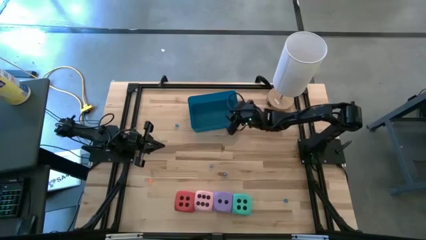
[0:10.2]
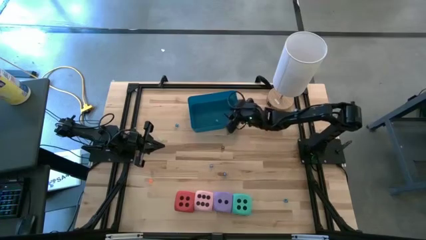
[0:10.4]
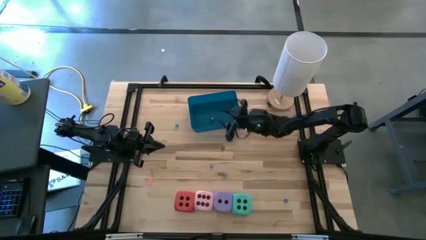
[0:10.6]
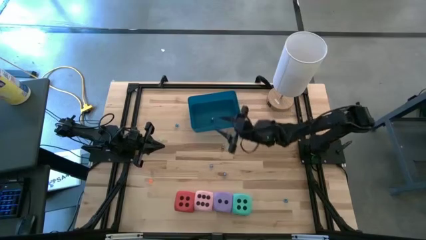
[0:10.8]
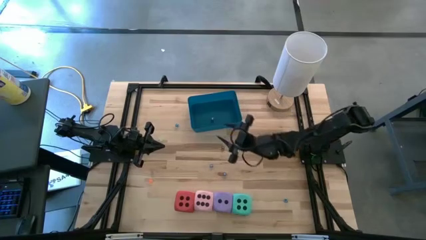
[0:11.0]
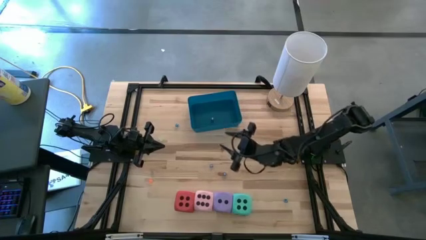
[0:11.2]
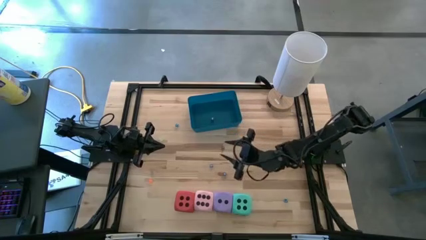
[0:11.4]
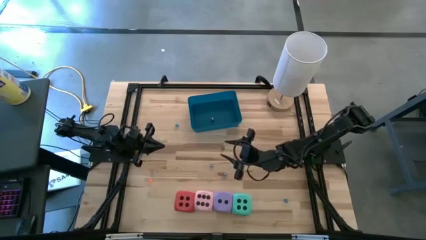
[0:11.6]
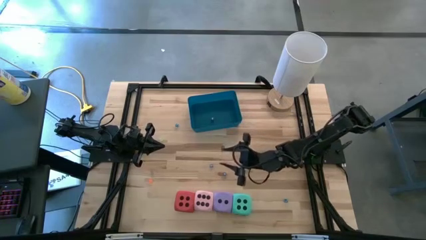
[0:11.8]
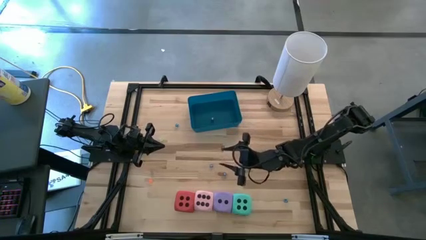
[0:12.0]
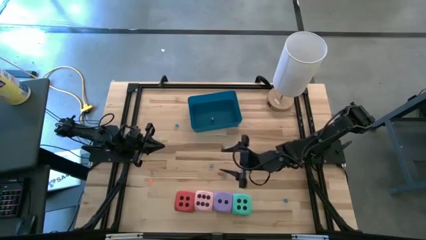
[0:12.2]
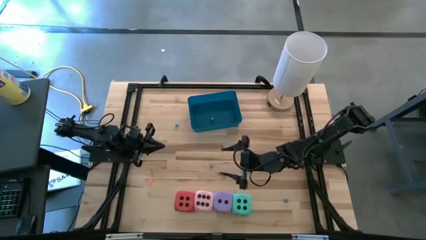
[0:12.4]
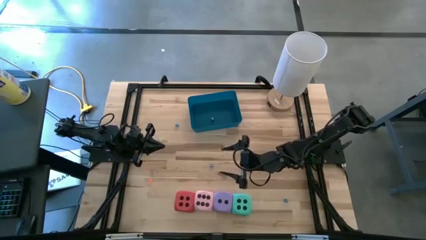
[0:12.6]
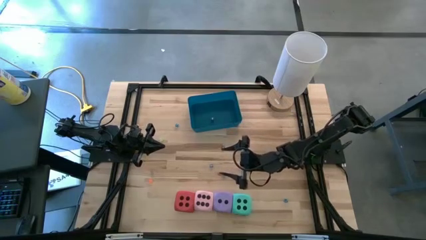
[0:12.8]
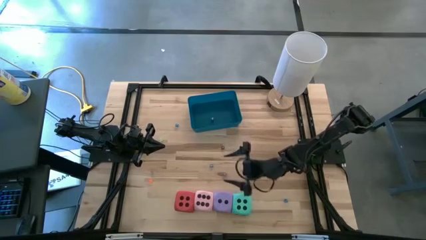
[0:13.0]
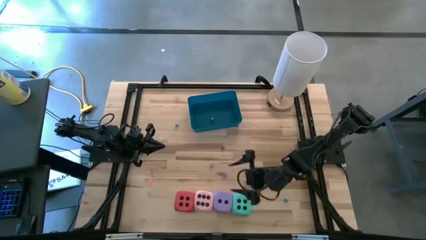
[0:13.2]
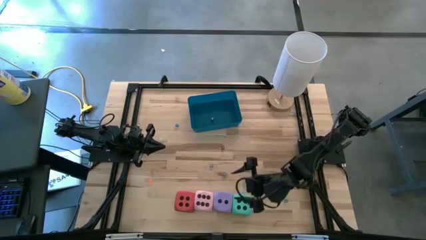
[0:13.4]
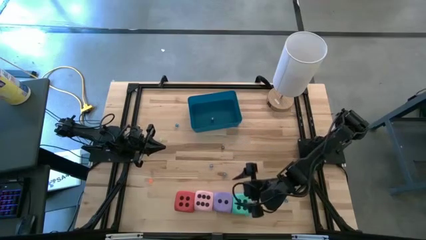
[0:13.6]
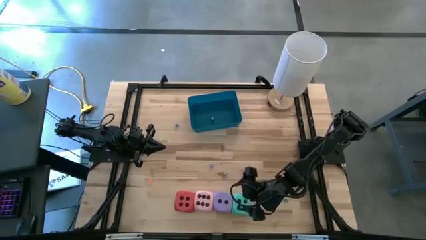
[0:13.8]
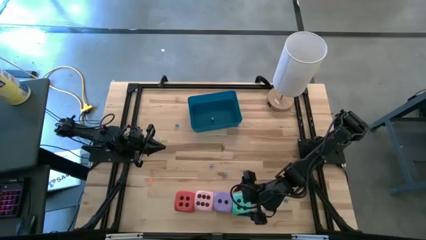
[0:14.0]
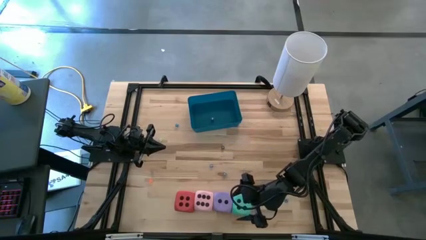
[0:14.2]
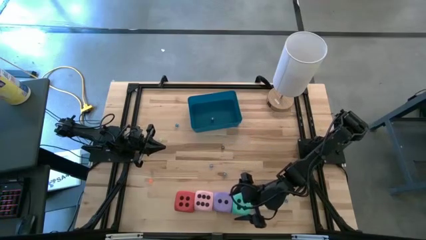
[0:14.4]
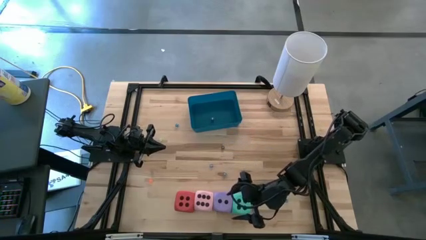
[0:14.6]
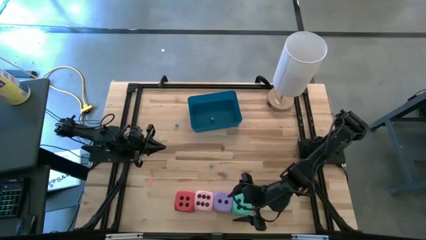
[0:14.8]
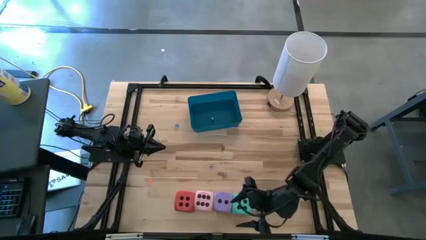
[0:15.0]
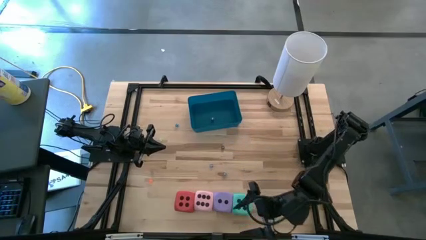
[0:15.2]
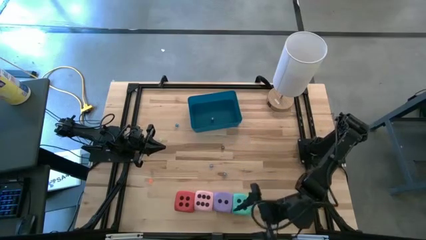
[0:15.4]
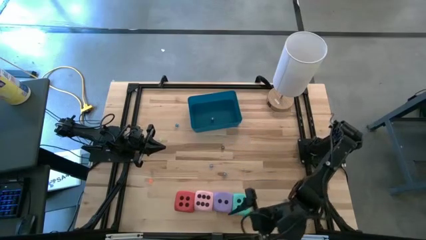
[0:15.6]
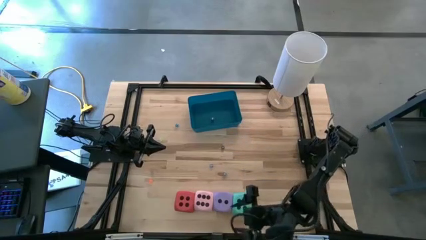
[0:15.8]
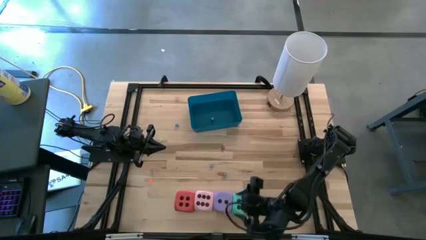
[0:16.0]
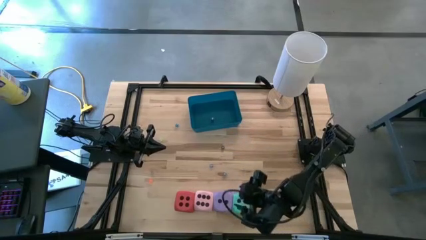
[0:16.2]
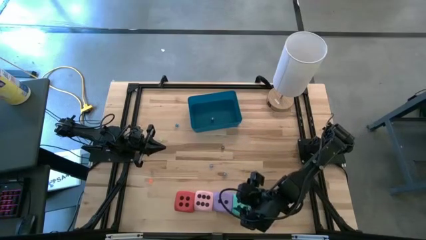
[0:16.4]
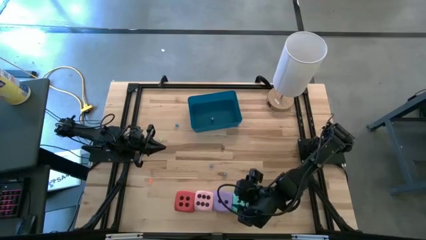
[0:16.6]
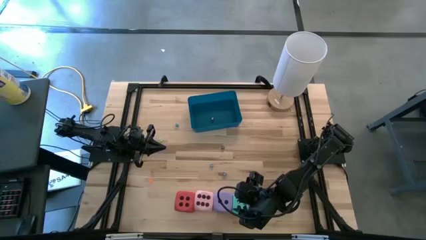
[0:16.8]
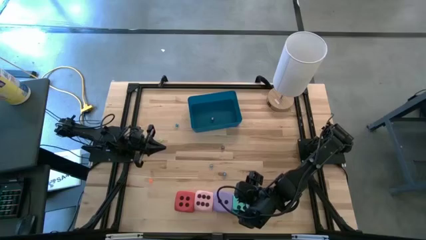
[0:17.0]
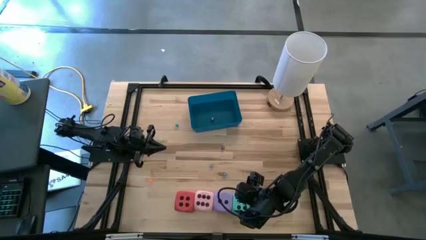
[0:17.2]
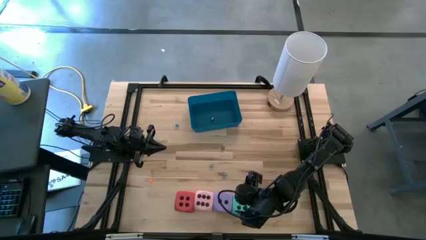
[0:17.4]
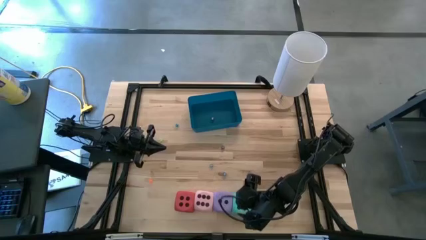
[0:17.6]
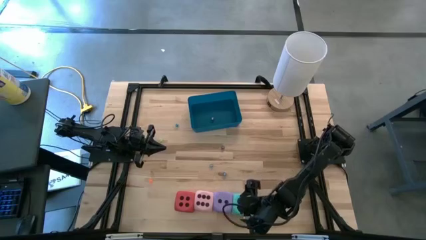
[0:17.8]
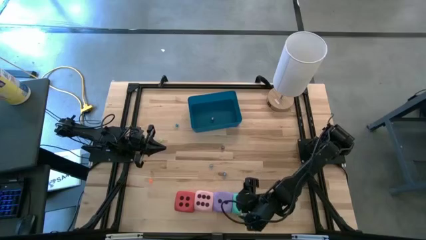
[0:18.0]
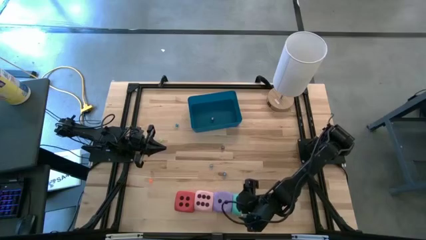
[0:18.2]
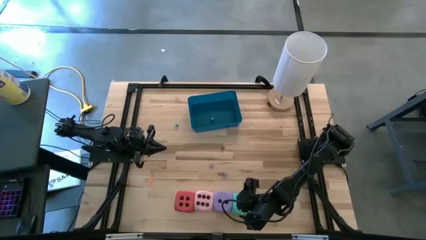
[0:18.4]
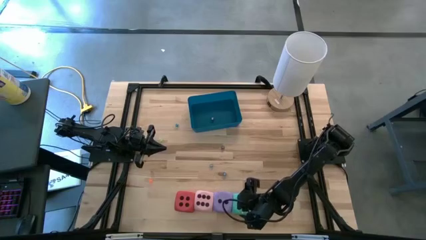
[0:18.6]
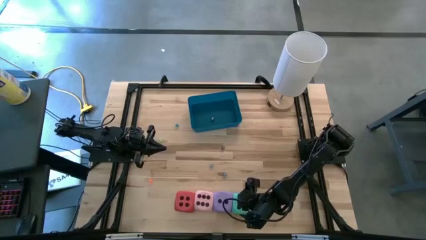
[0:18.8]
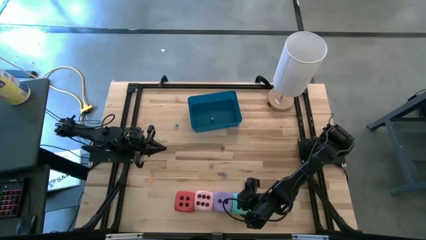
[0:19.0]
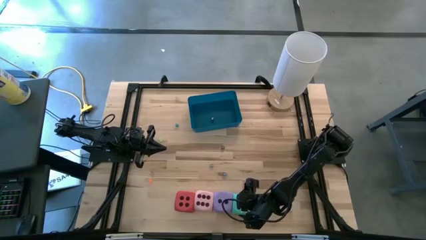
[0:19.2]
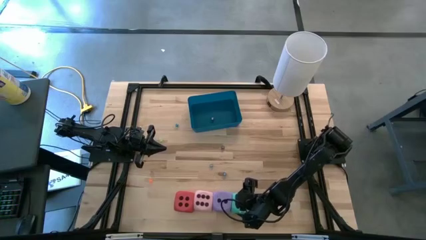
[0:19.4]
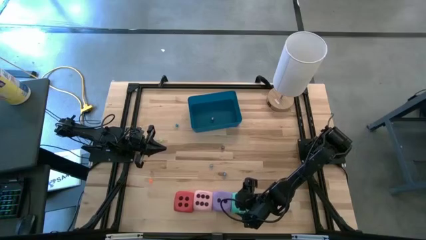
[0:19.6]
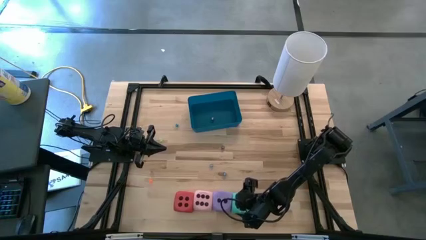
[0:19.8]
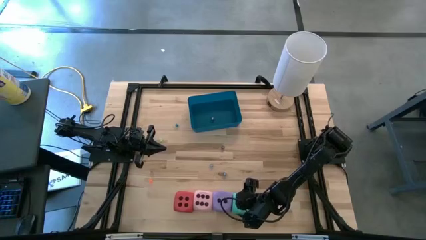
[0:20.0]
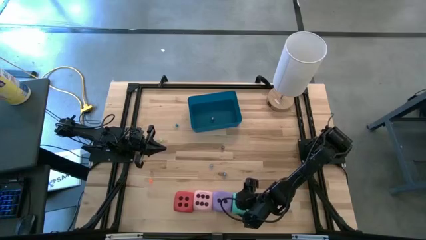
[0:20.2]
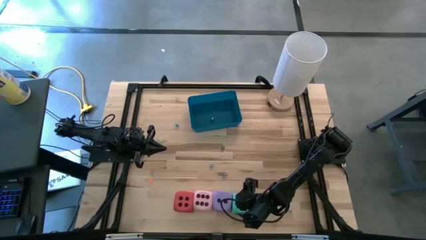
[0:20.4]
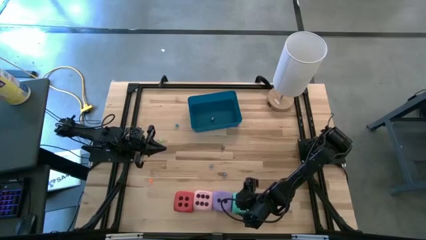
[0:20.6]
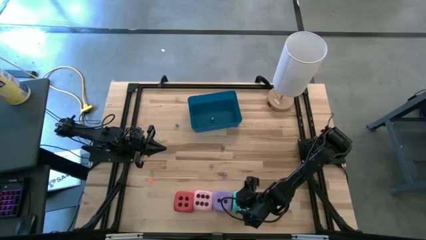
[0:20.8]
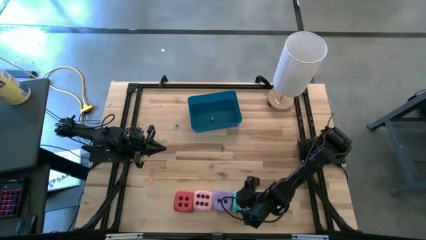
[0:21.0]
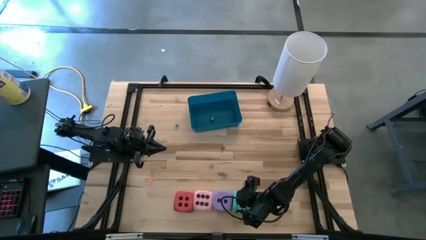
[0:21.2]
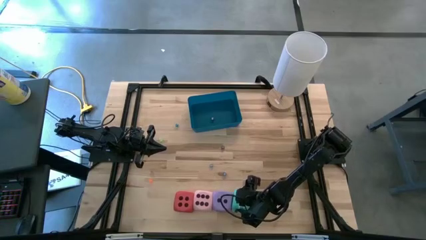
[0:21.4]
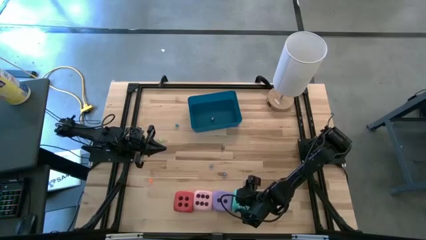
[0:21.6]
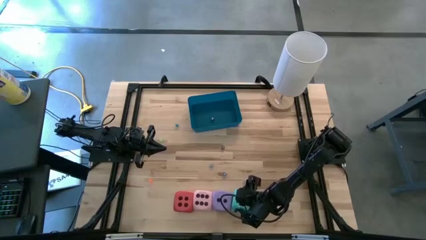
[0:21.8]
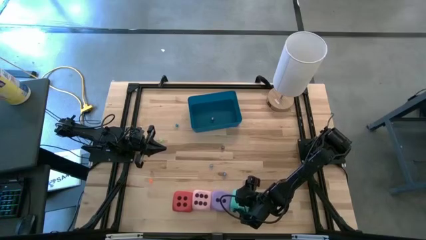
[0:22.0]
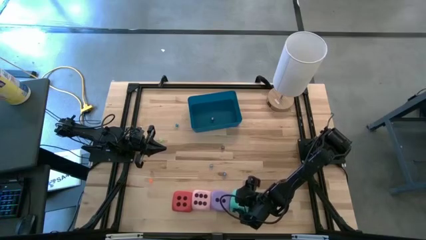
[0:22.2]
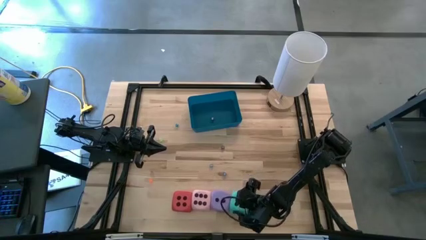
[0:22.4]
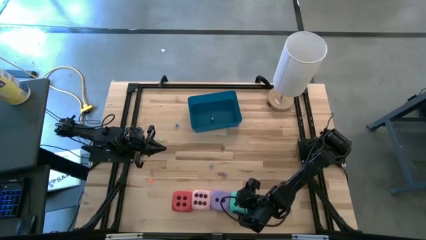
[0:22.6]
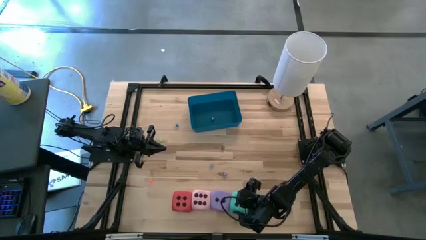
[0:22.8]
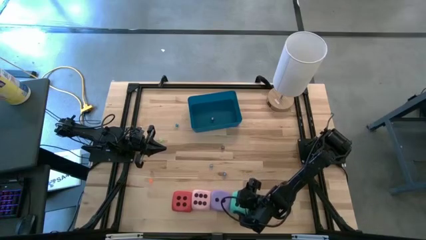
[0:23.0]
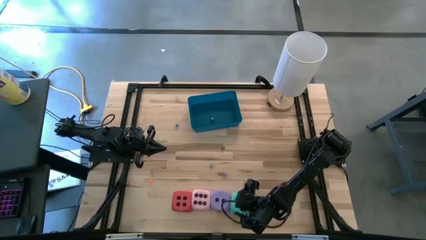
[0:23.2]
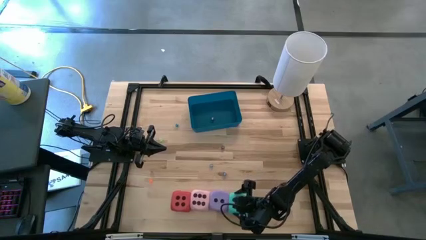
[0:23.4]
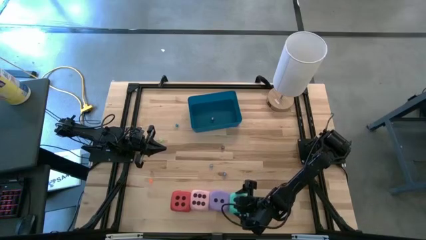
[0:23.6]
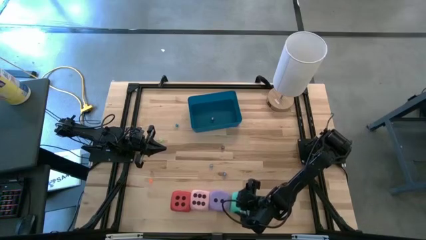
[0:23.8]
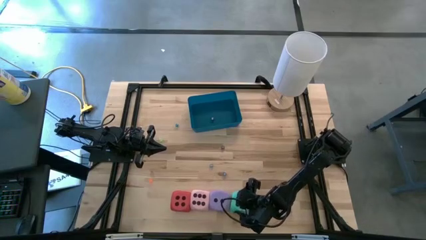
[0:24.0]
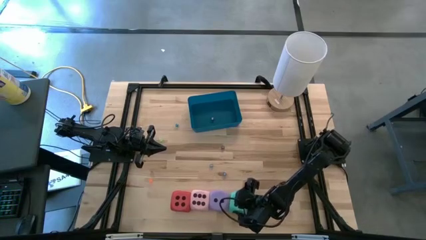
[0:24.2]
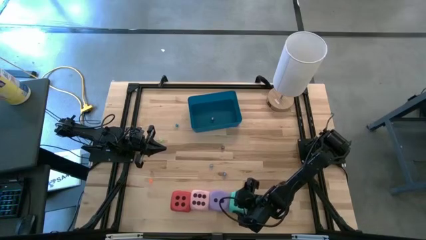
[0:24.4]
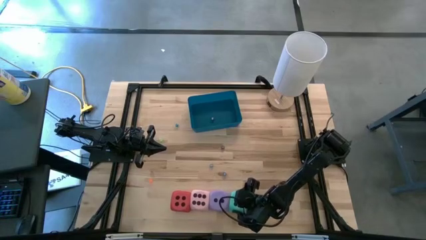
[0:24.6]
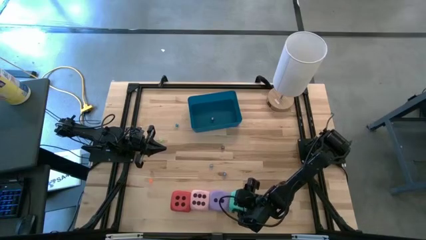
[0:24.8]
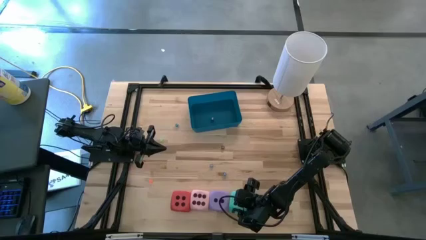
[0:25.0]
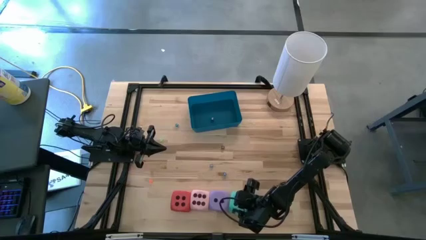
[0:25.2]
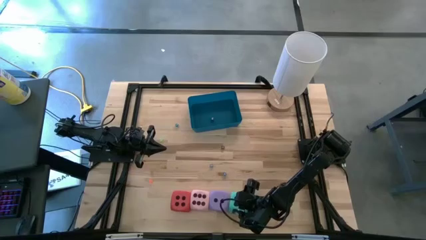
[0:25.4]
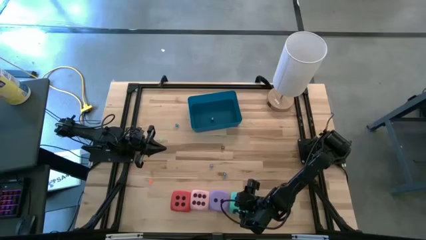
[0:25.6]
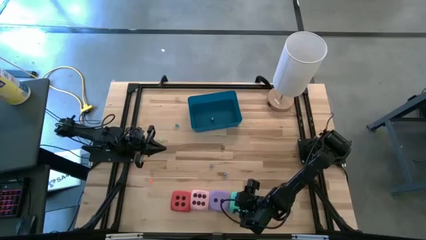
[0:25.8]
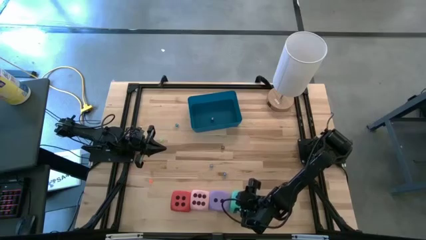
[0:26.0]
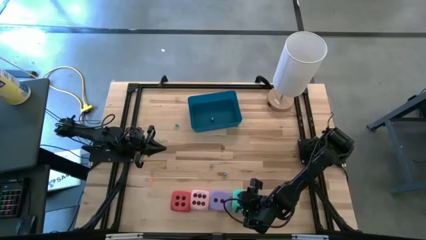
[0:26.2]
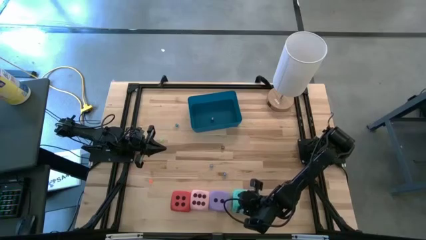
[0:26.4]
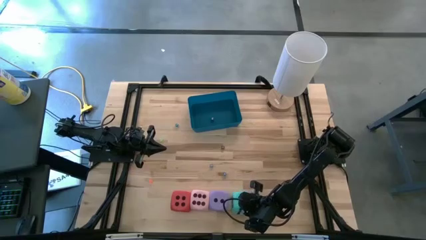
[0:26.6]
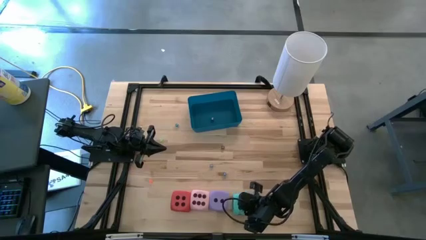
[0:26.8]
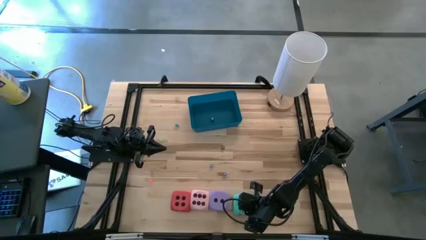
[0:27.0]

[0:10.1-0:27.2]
Task: Pick & Place Dice
Put the large blue dice into the blue bin
